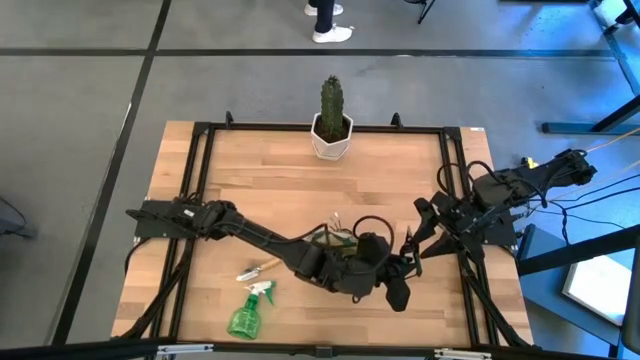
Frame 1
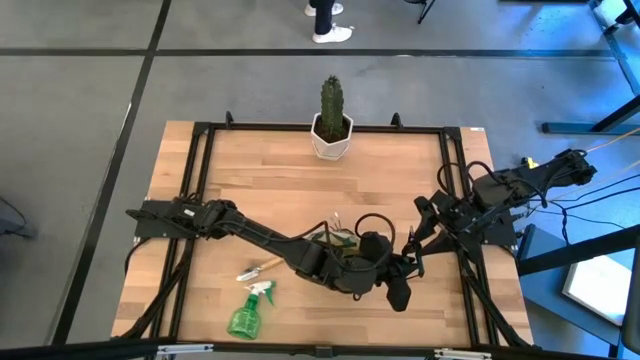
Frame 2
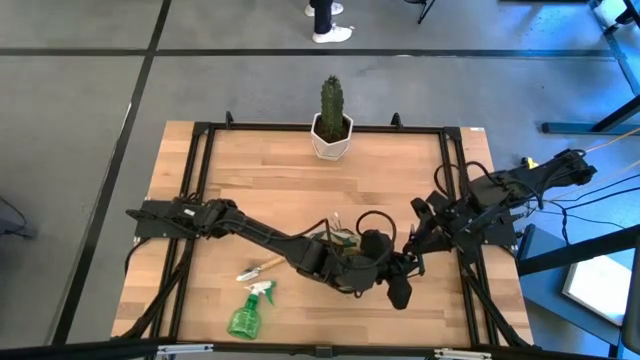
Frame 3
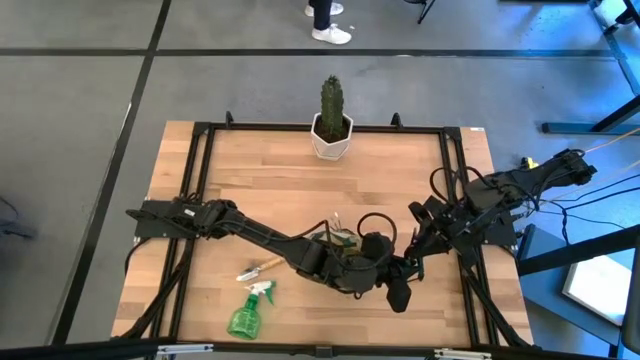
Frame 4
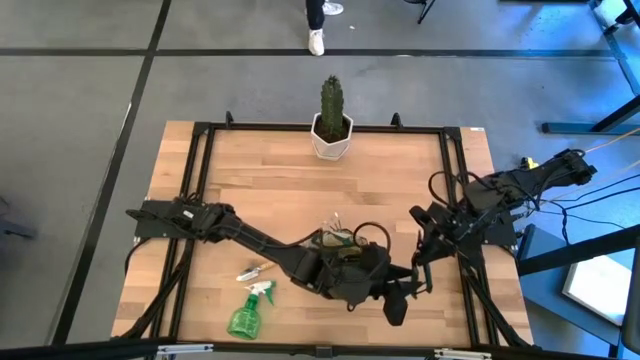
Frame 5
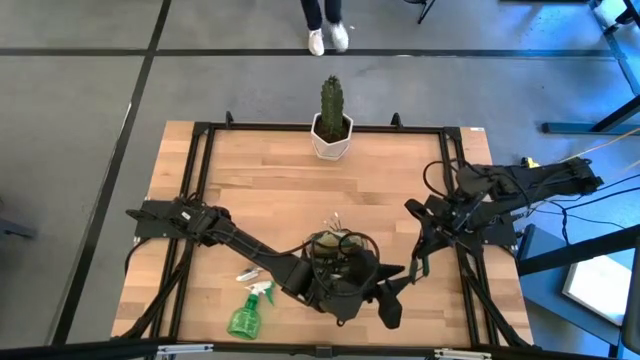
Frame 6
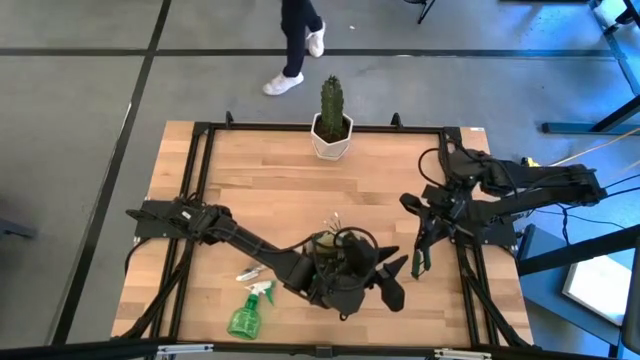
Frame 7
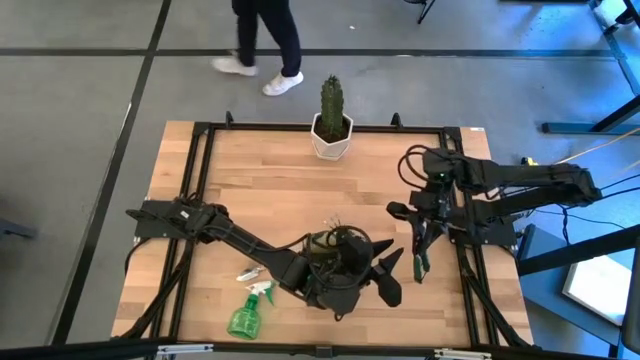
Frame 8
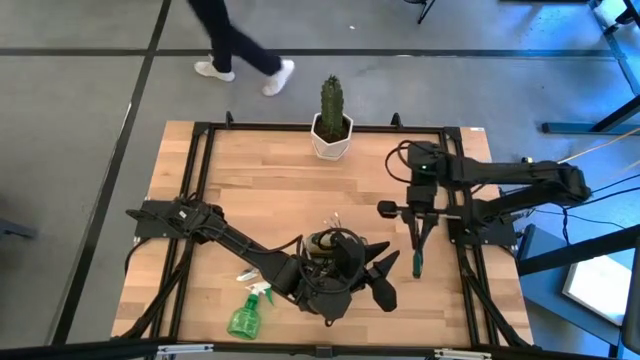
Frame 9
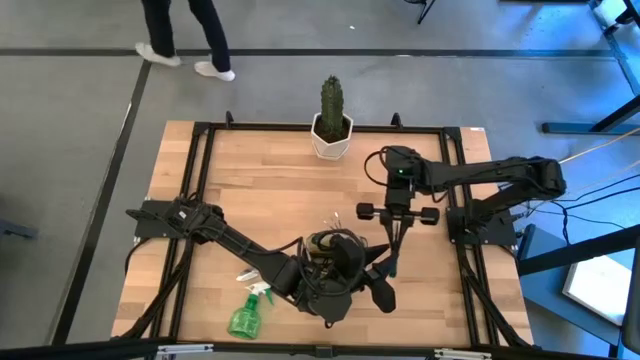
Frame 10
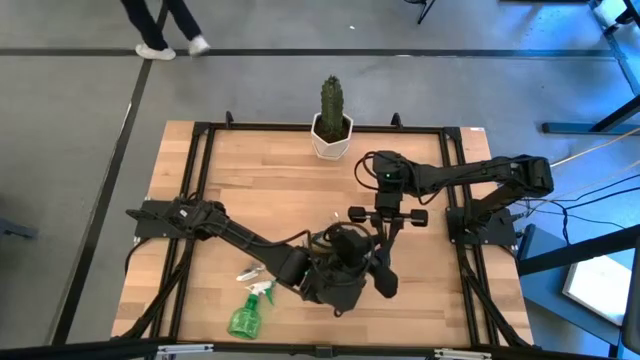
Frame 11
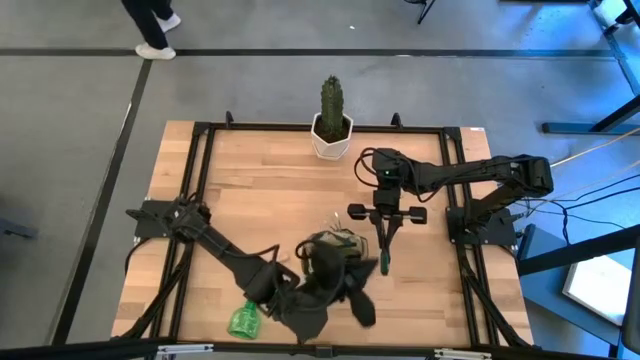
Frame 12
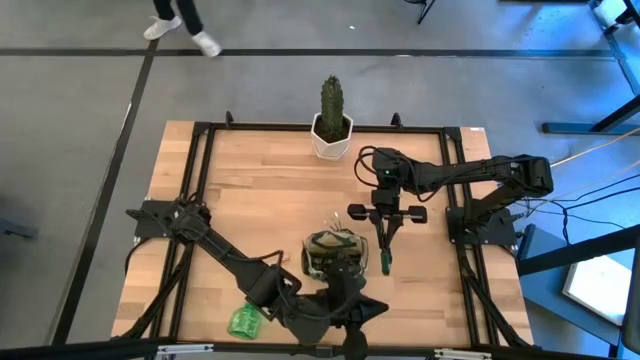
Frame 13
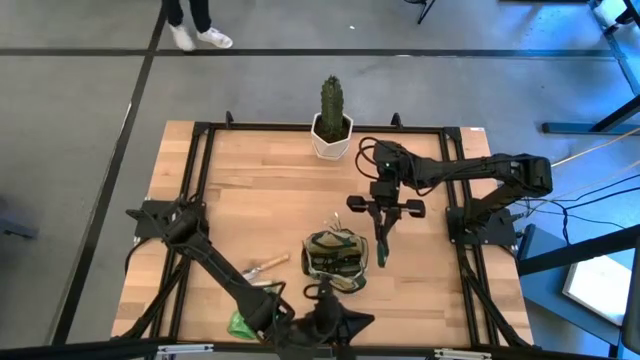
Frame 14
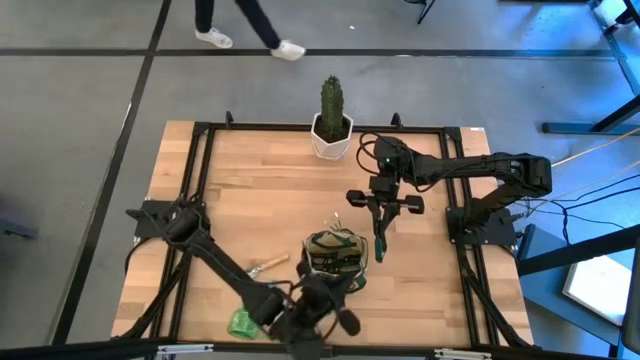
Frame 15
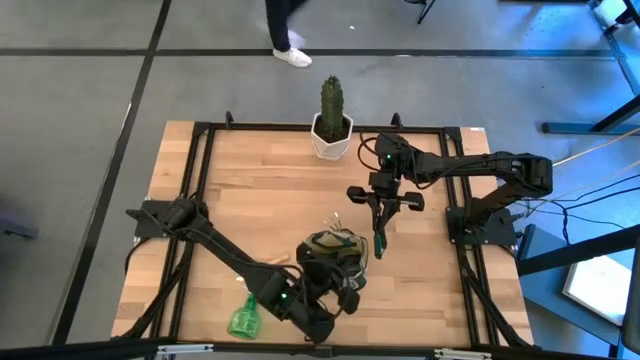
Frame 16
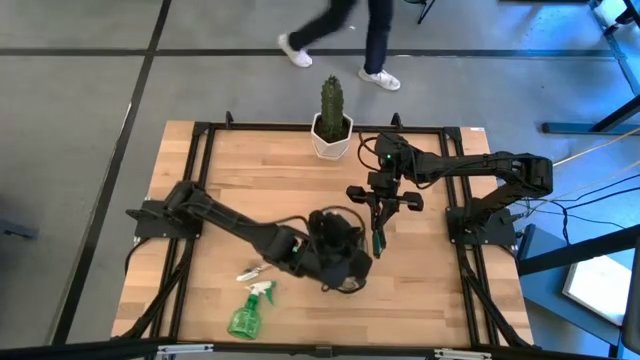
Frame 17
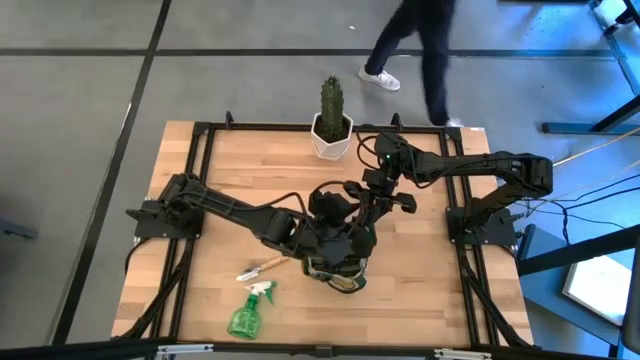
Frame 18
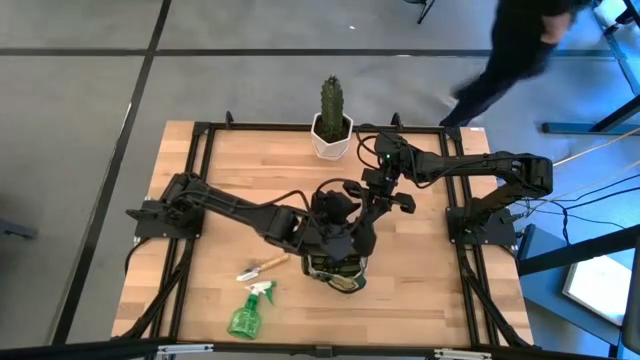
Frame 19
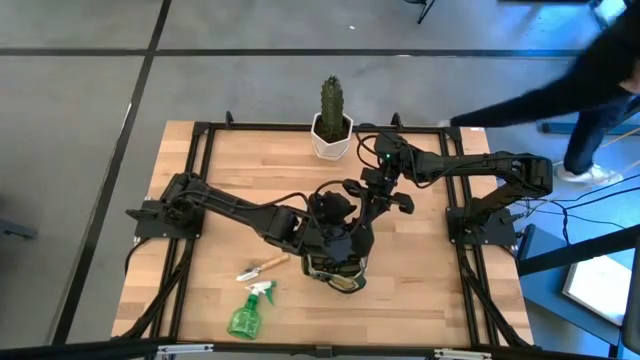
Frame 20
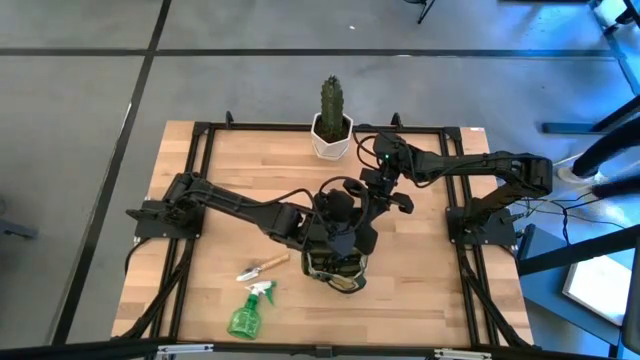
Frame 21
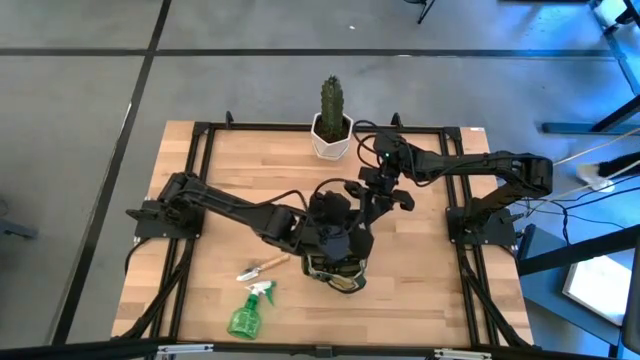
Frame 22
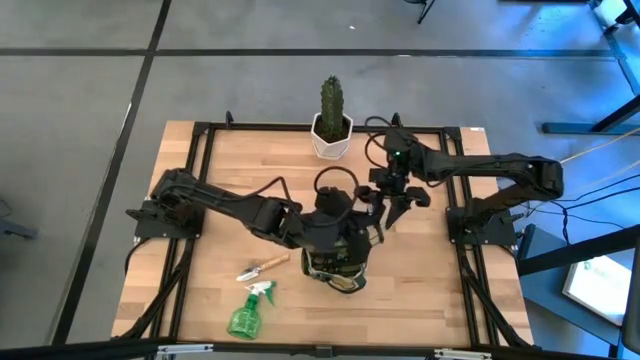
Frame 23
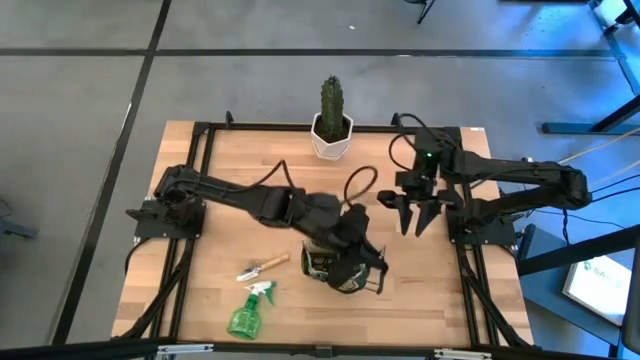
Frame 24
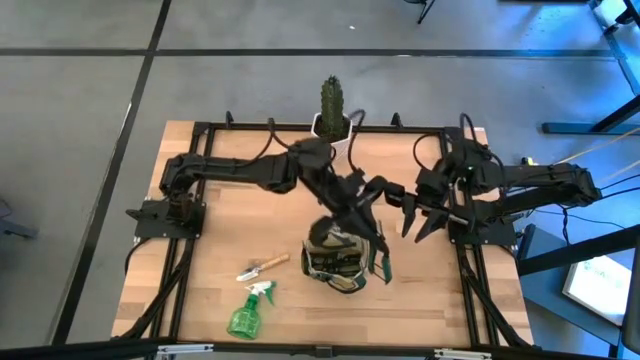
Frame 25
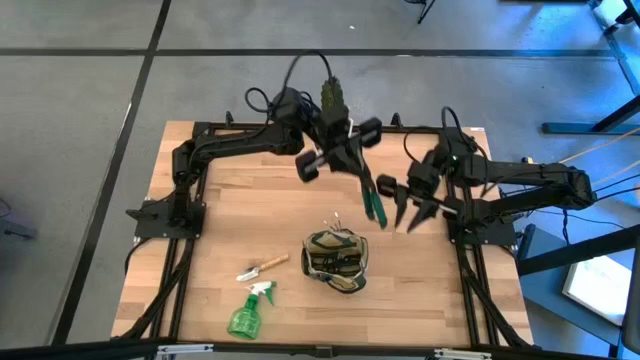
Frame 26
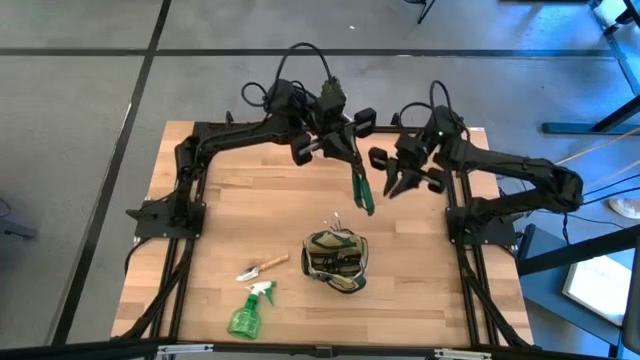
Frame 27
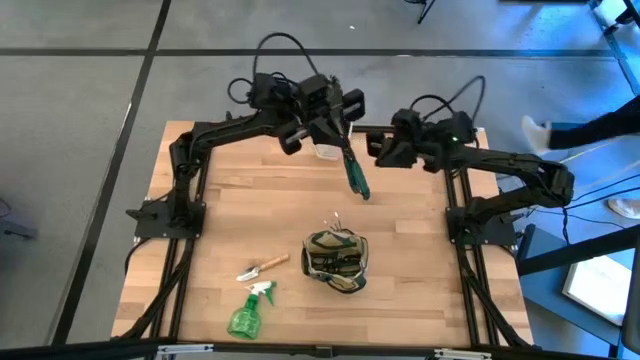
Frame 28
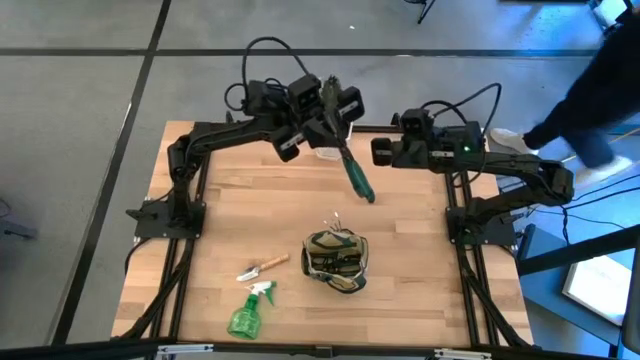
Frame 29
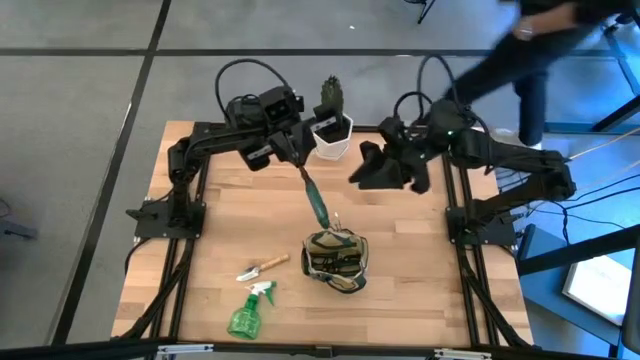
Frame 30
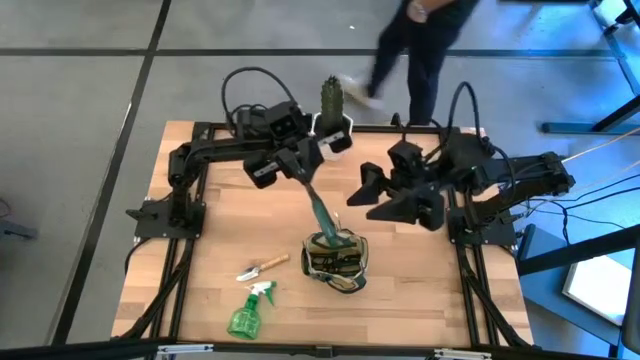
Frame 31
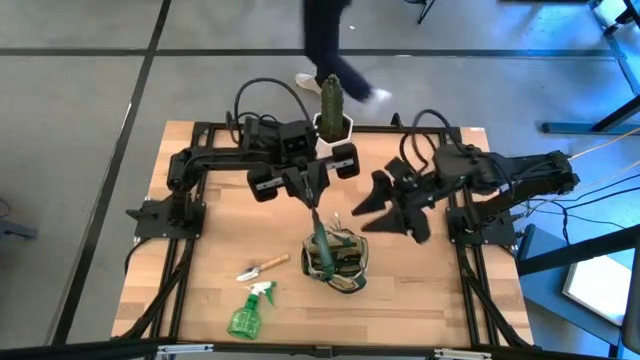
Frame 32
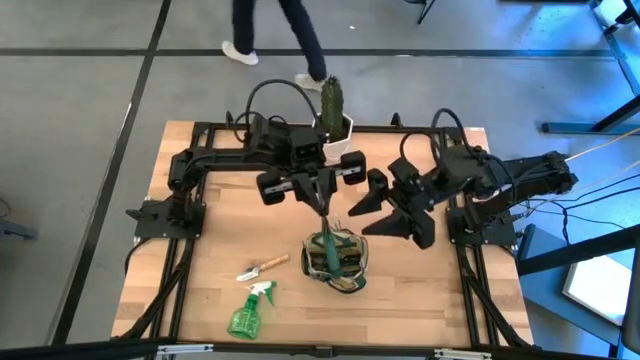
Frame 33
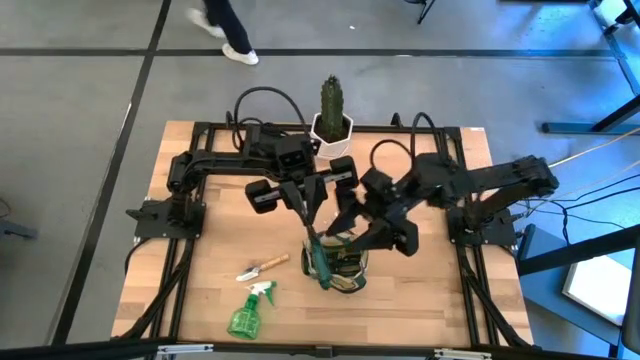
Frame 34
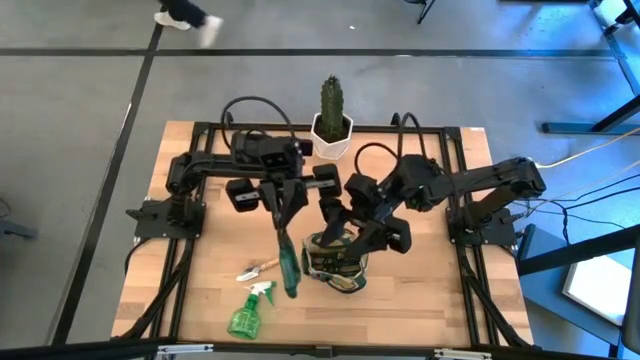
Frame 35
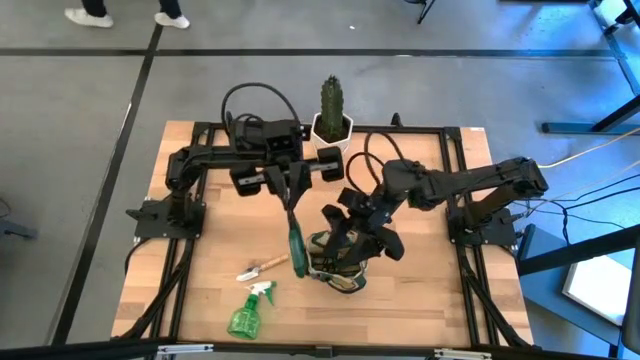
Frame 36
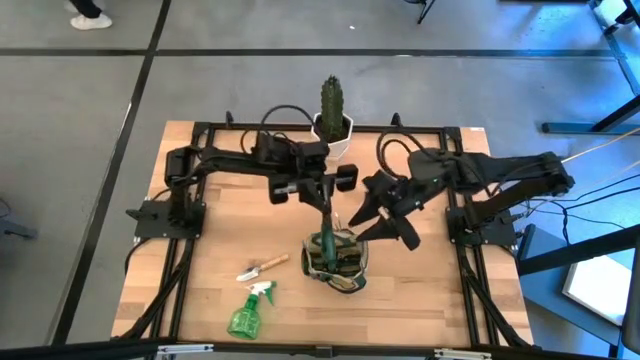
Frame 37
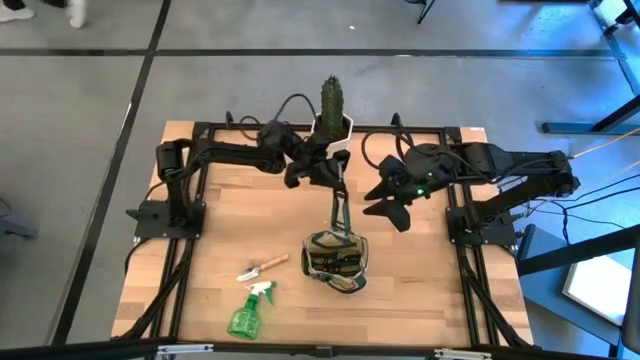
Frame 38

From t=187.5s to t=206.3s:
Task: Pick & Place Garden tools in Gardening bag
Put the green fruit pruner into the green gardening bag

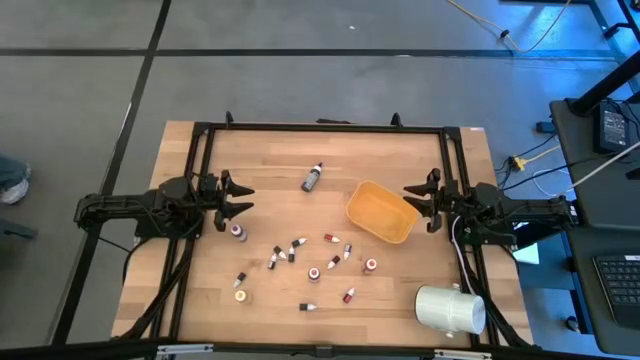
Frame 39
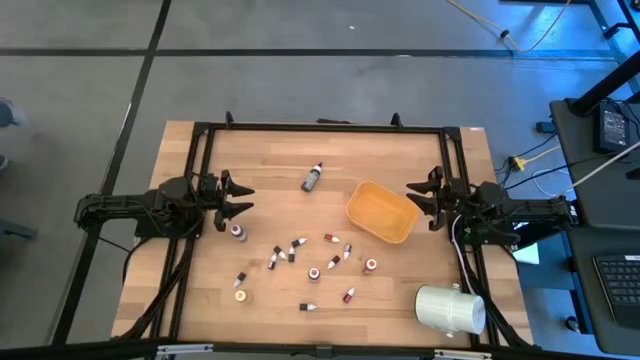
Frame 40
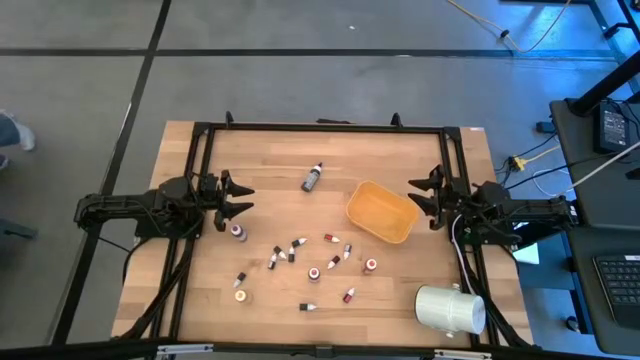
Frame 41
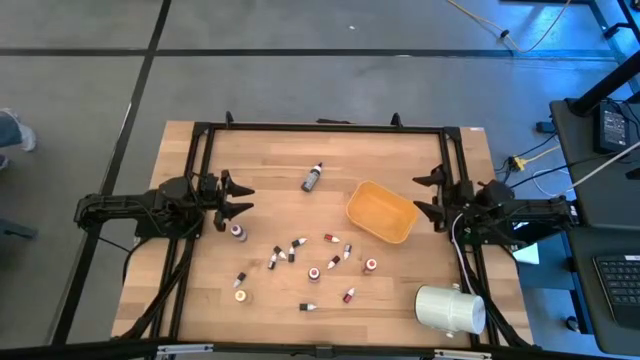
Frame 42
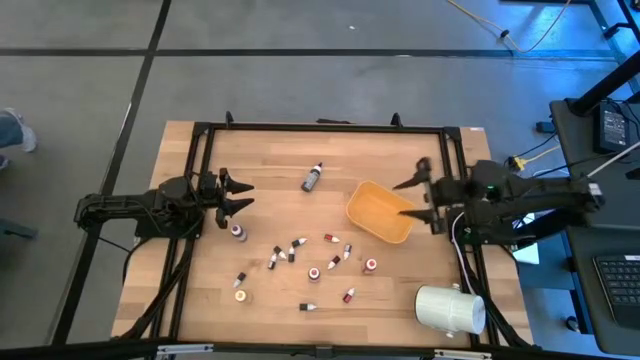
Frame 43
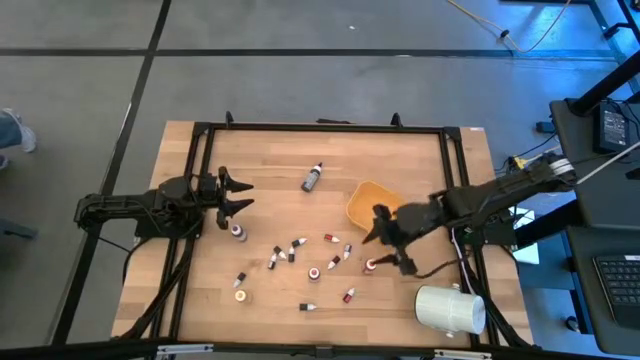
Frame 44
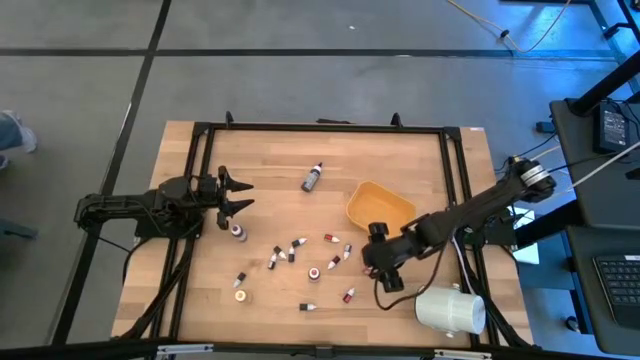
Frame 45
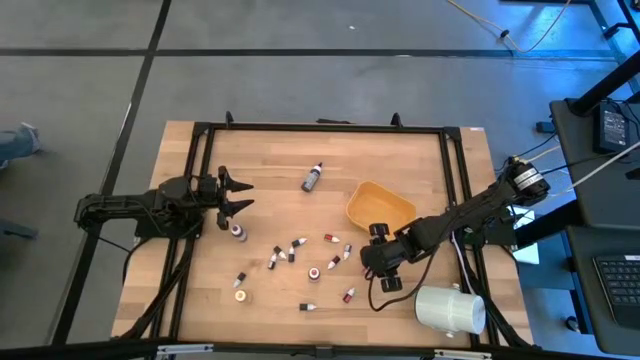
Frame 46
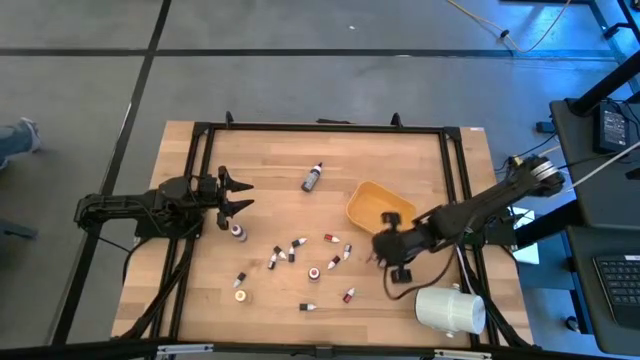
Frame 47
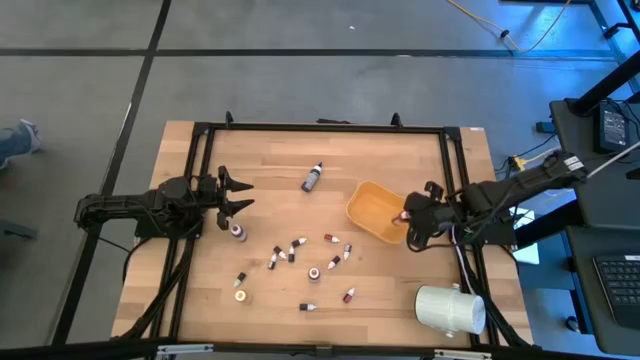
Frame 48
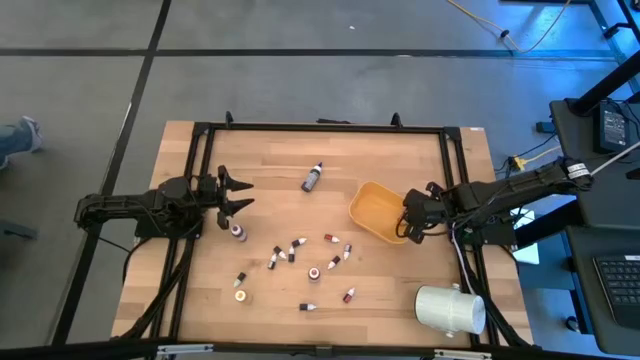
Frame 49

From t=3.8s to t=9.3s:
Task: Pick & Place food coloring
Put the large orange food coloring bottle in the yellow bin
